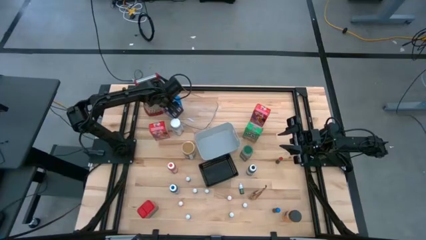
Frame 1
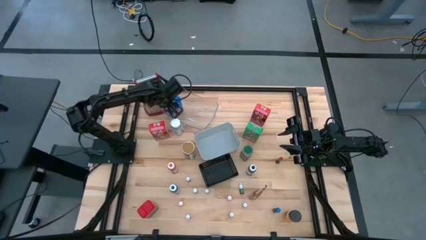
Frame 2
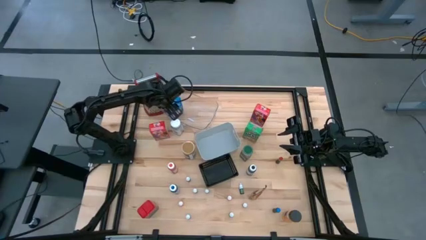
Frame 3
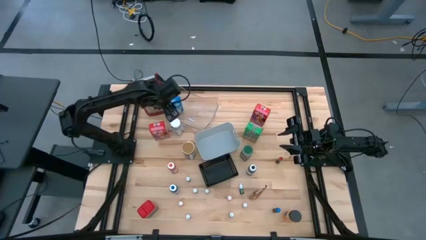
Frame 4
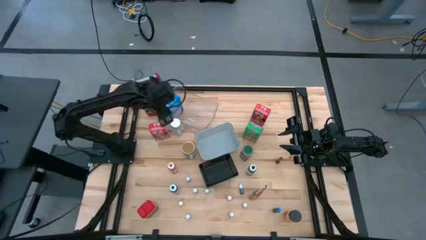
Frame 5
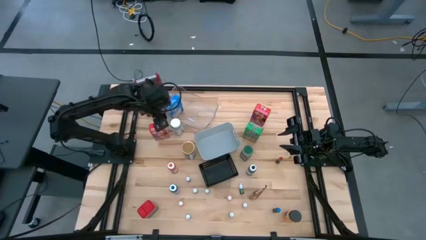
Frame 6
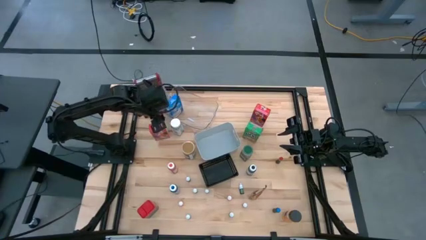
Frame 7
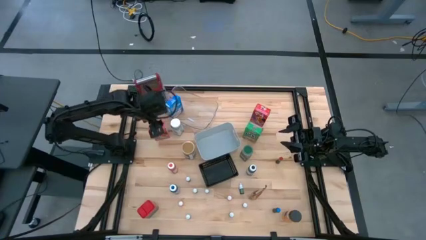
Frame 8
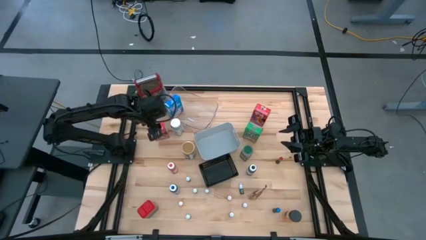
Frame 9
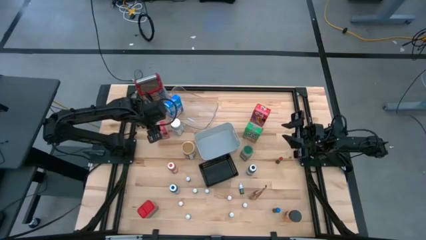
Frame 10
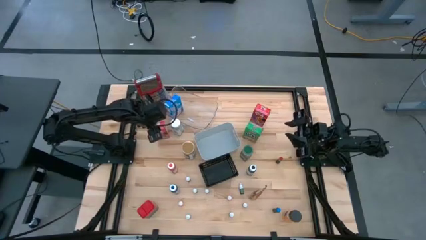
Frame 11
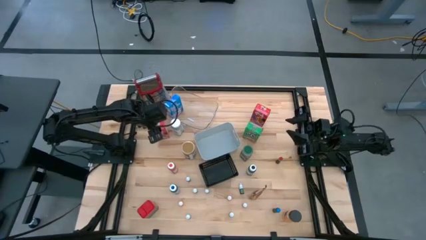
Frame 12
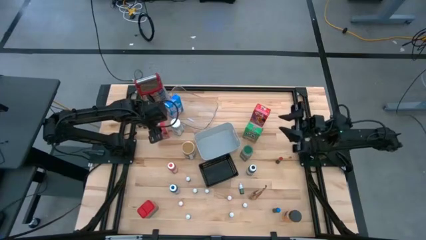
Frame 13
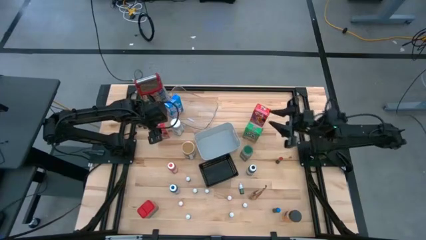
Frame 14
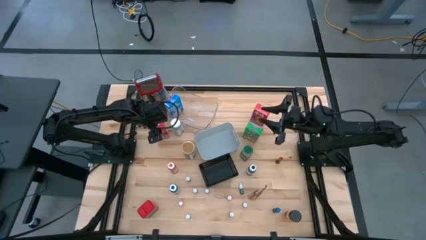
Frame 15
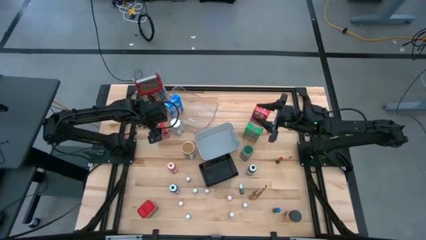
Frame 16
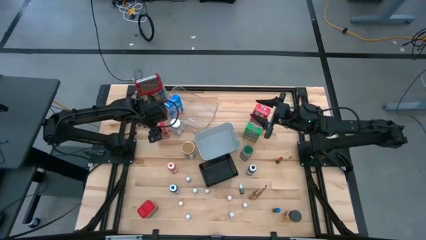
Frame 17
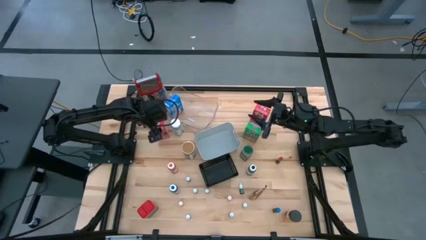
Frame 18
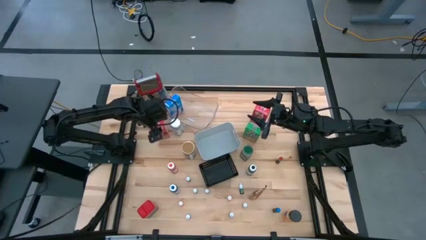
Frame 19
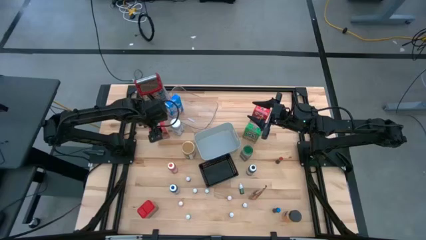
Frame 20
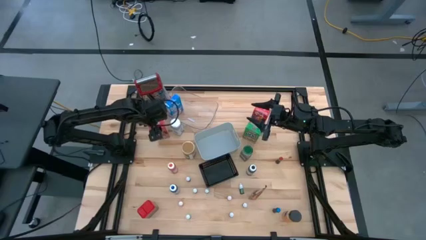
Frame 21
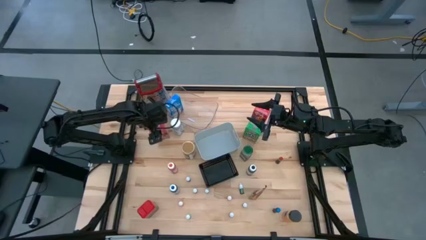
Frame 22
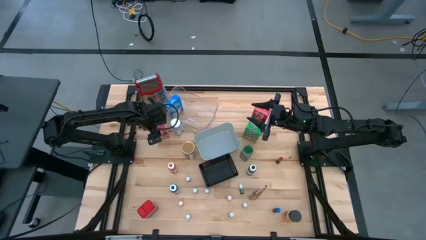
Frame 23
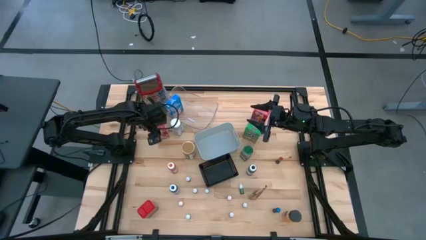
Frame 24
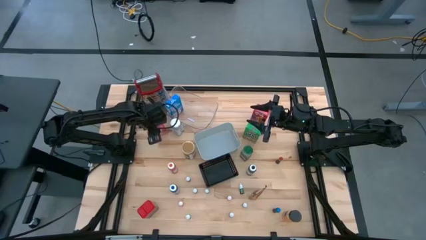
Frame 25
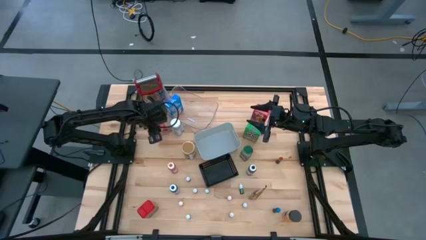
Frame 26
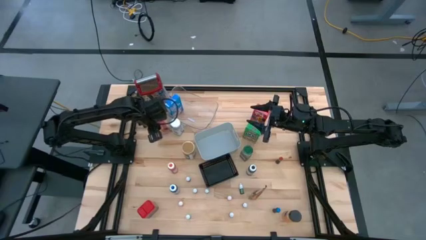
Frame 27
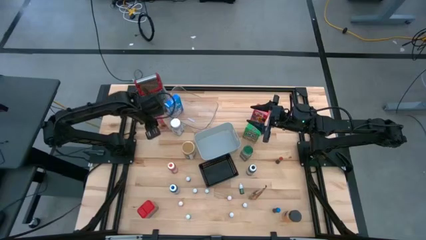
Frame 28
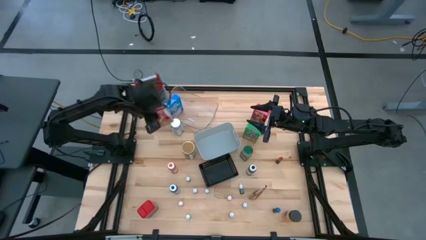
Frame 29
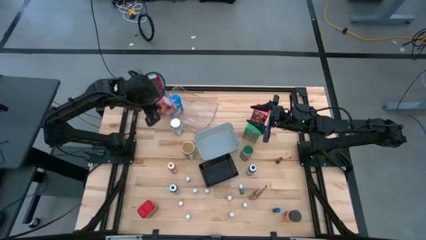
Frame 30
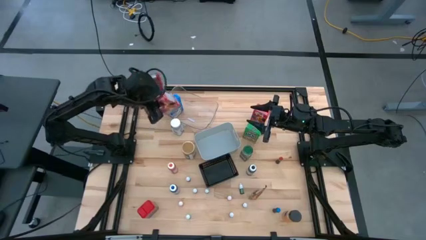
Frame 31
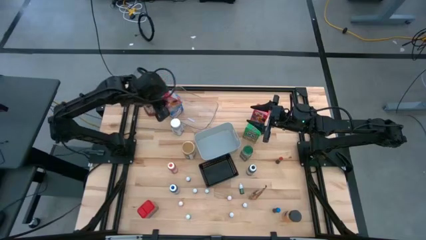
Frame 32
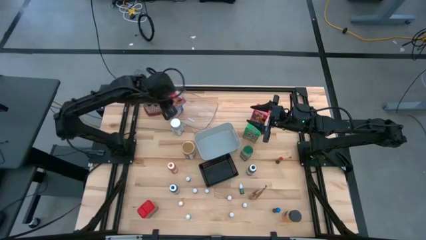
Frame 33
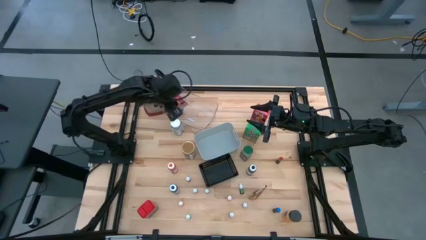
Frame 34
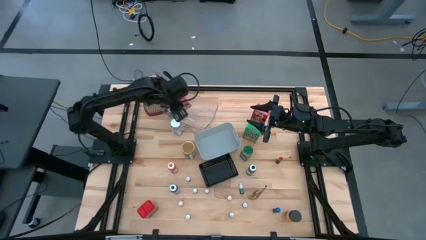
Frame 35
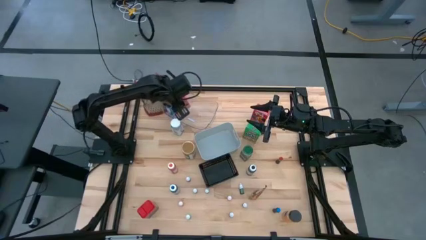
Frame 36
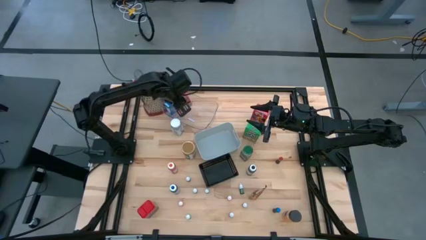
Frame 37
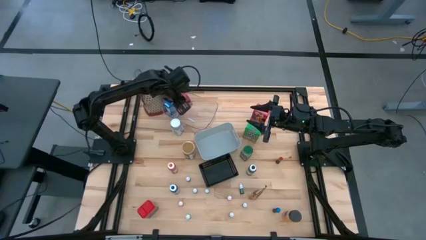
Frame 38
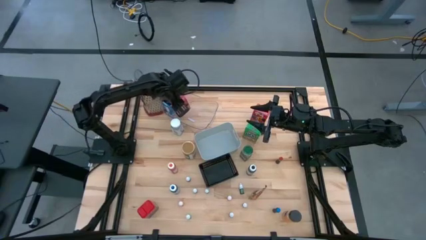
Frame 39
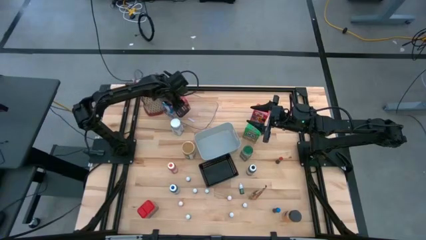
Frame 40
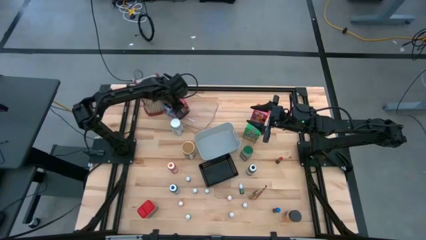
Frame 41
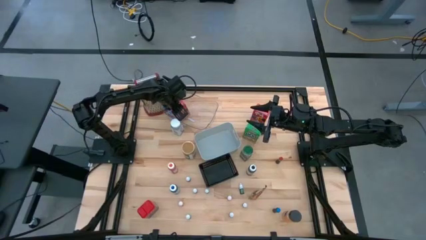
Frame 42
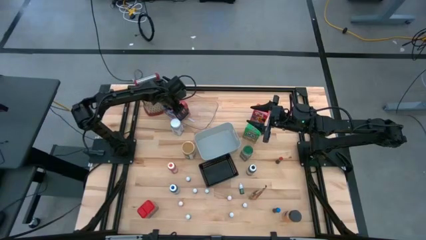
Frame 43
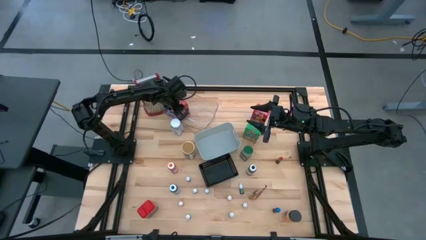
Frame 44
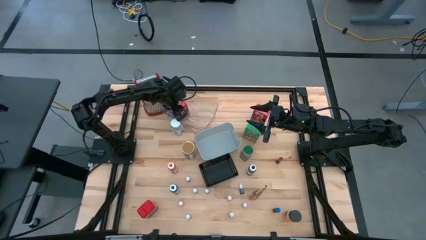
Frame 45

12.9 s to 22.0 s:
Task: Pick & Place Kitchen Items
Put the red cereal box into the transparent bin

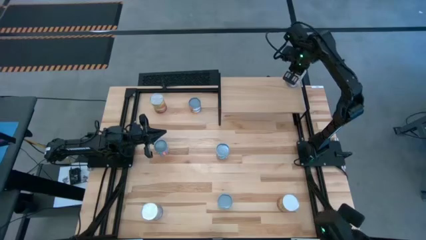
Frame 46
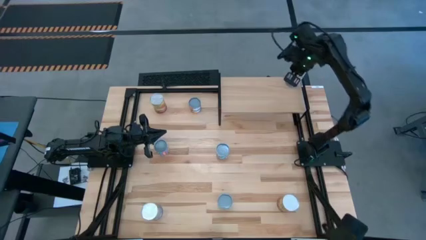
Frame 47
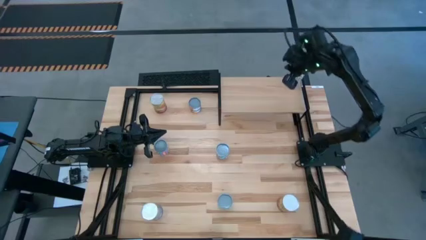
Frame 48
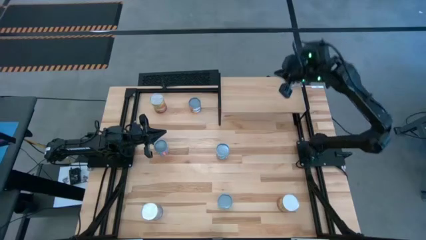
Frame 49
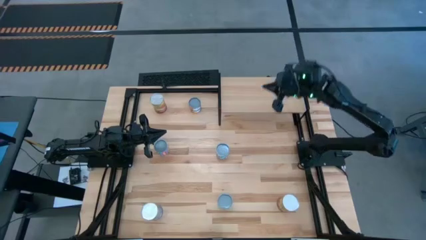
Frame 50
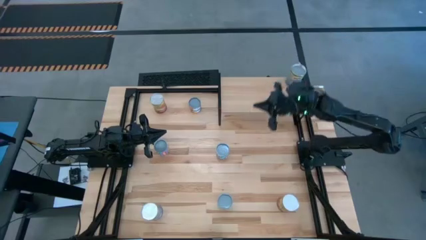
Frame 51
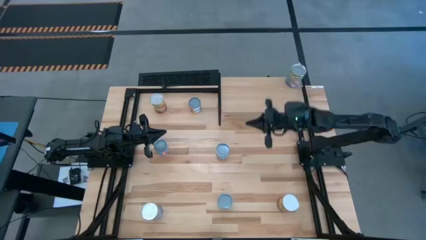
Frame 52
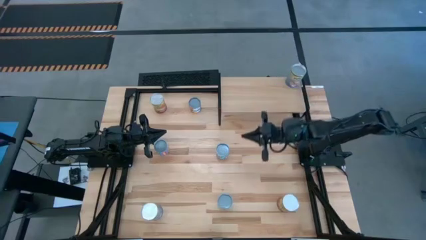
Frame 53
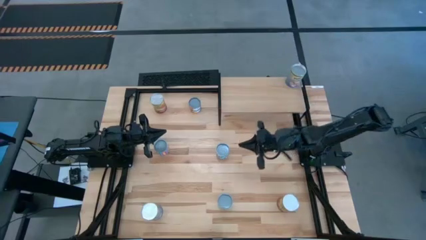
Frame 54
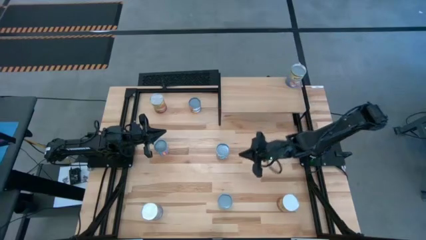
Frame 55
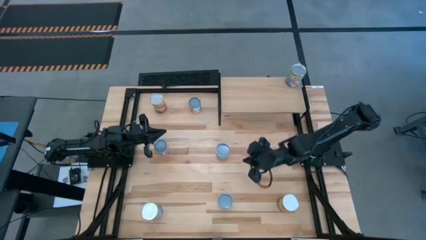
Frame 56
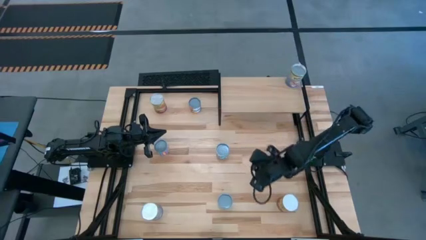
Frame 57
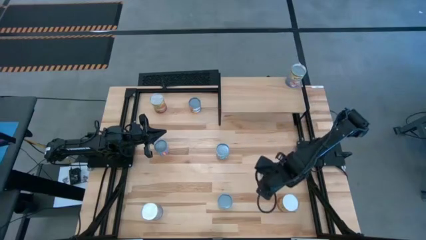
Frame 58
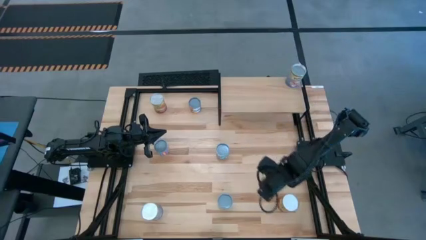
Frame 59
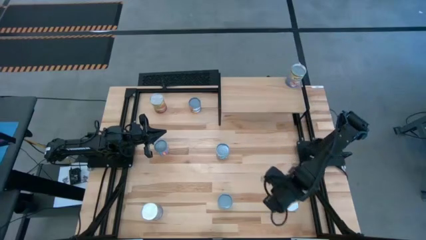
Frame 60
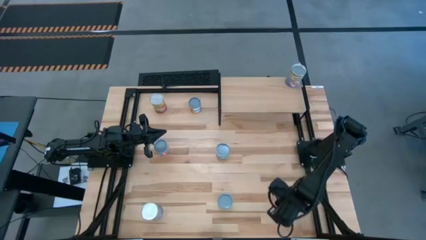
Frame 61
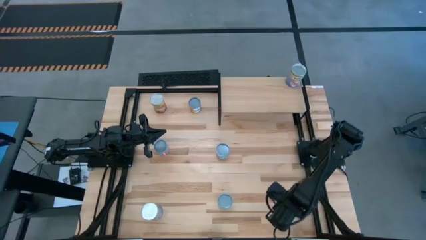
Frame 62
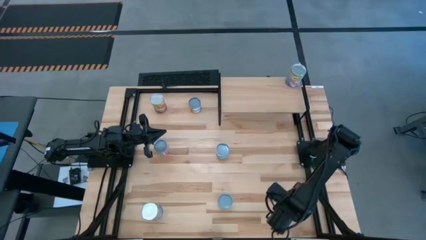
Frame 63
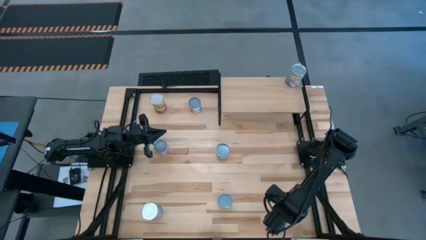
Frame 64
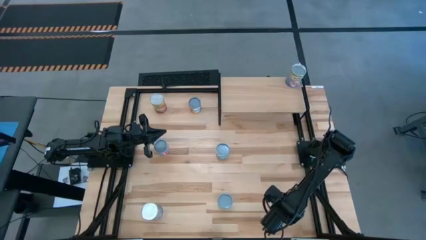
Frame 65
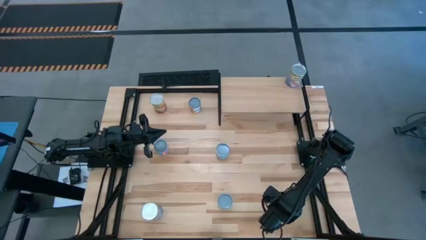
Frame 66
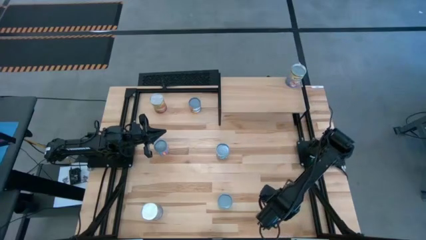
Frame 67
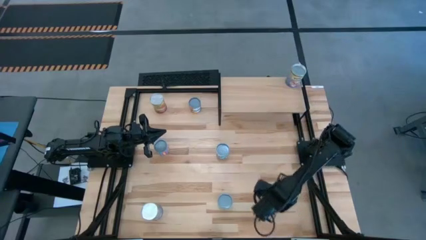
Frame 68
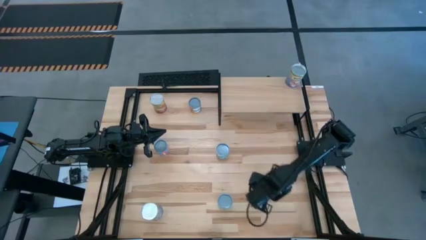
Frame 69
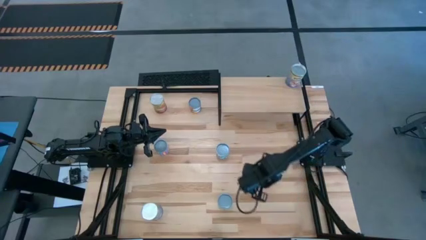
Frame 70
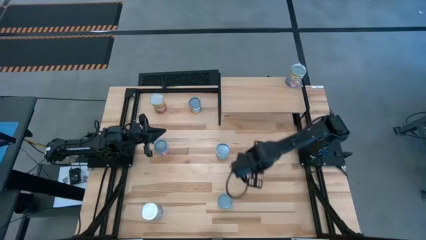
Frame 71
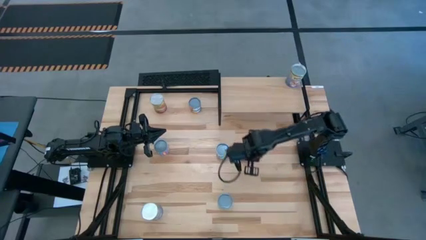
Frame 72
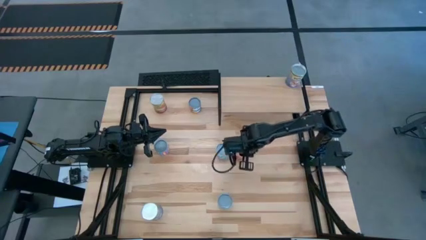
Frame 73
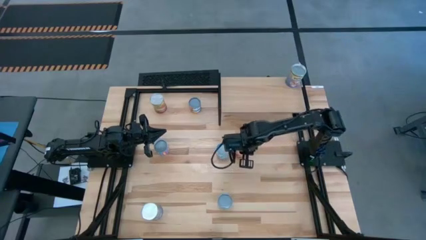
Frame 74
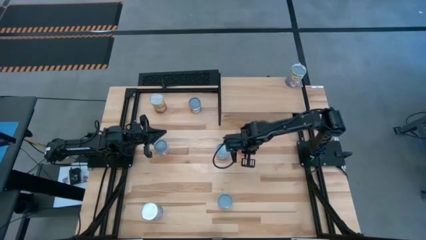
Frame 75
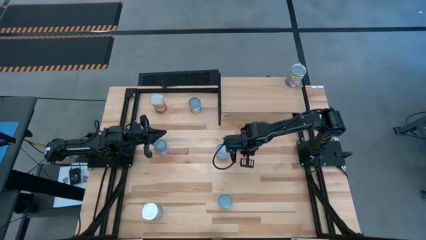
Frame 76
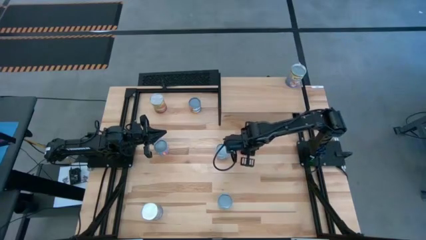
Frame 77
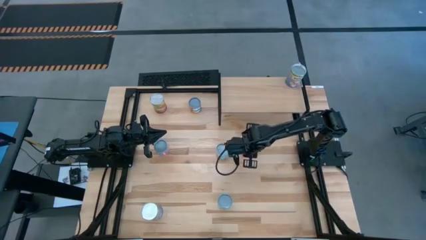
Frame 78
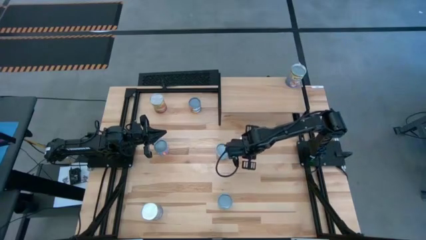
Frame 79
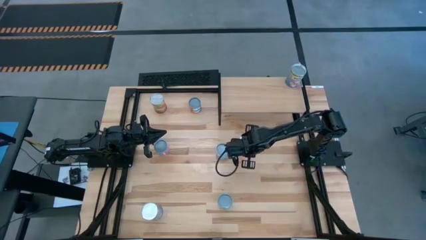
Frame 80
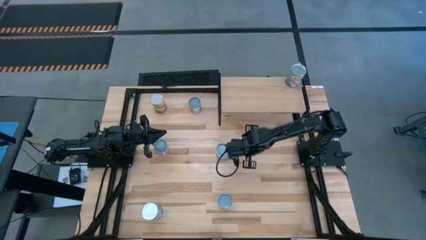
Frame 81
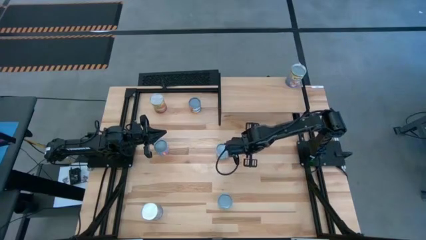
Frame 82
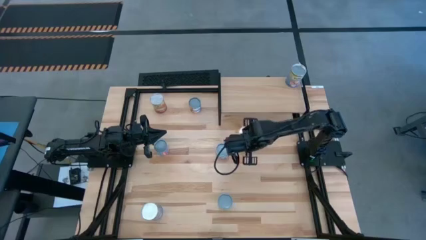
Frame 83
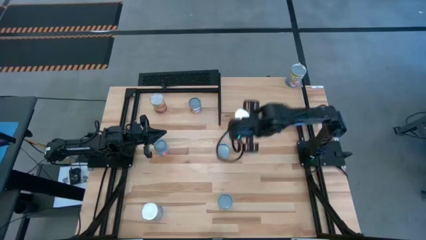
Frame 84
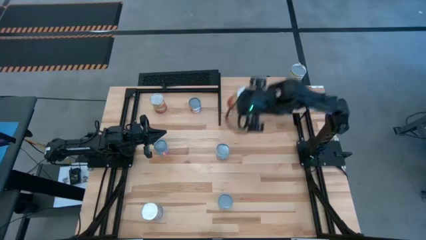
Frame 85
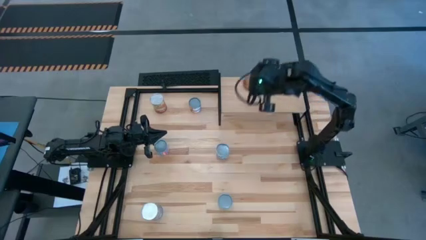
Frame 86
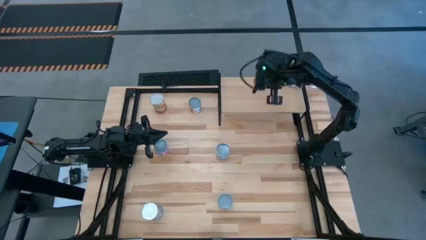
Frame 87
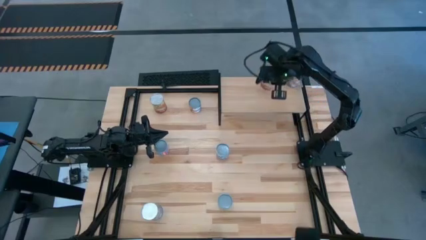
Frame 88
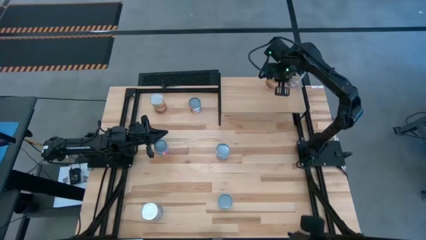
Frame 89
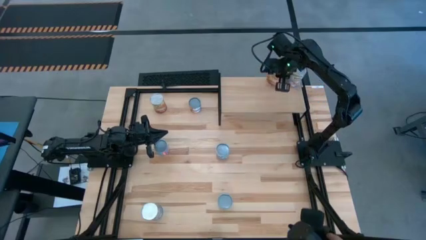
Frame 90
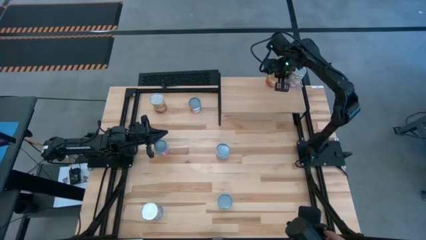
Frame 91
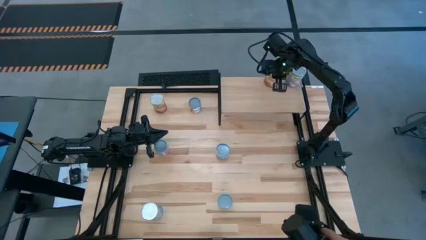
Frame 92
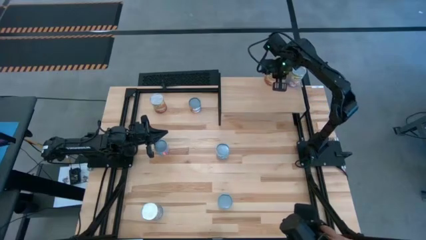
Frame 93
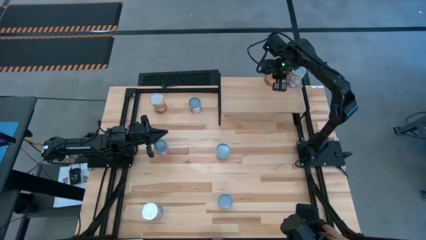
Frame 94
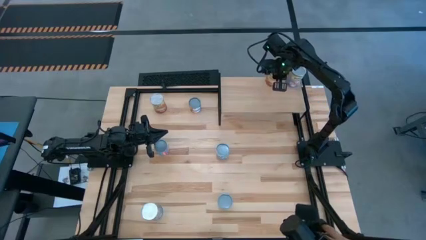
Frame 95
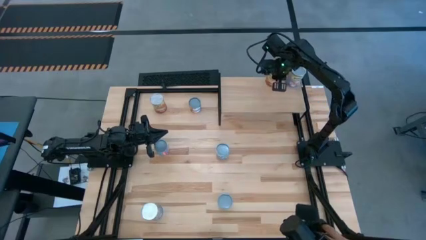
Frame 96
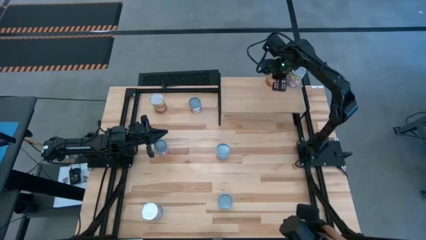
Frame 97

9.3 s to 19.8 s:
Task: Pick and place cans onto a shelf
Put the bottom large canned corn on the shelf
